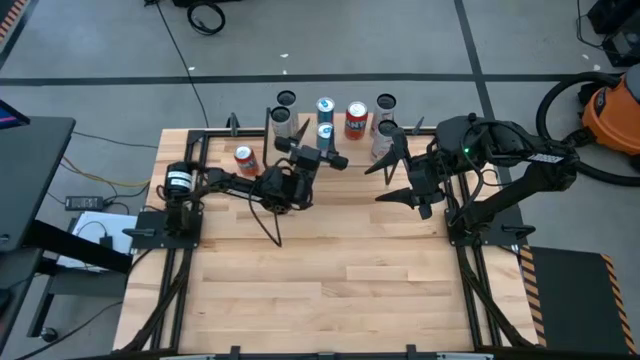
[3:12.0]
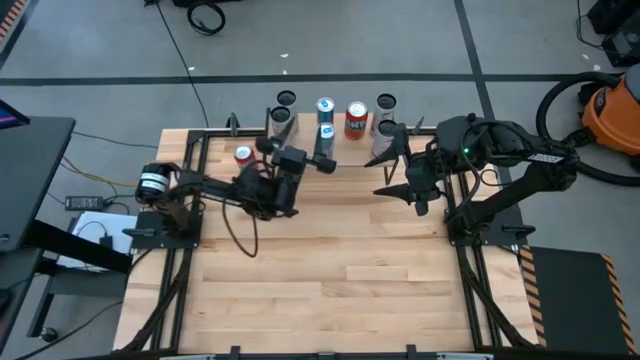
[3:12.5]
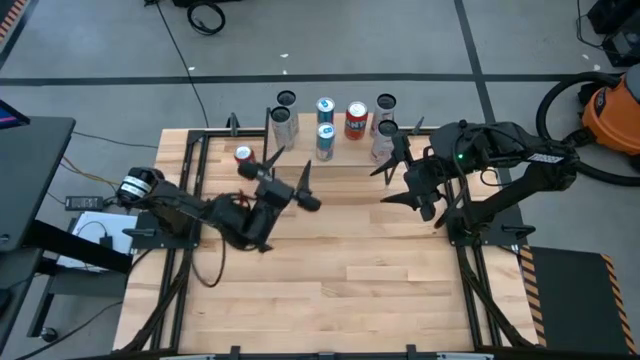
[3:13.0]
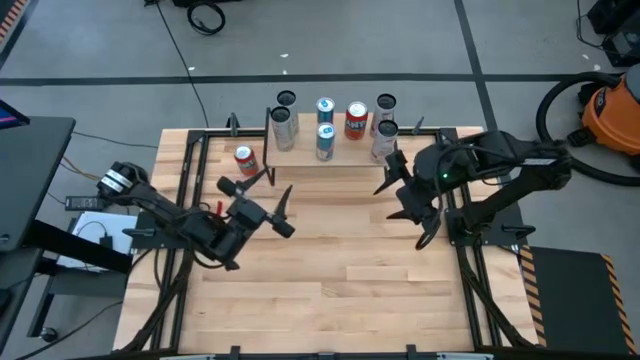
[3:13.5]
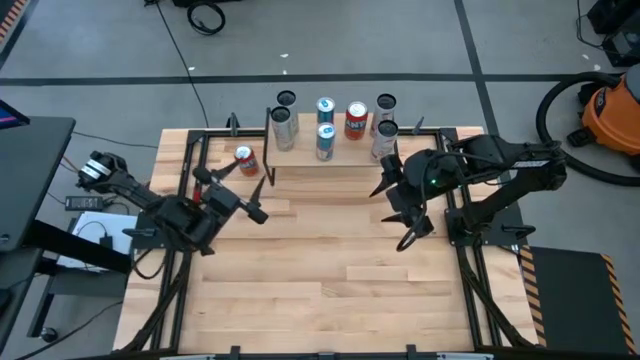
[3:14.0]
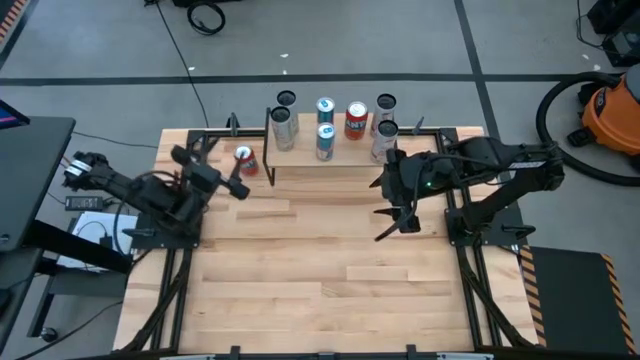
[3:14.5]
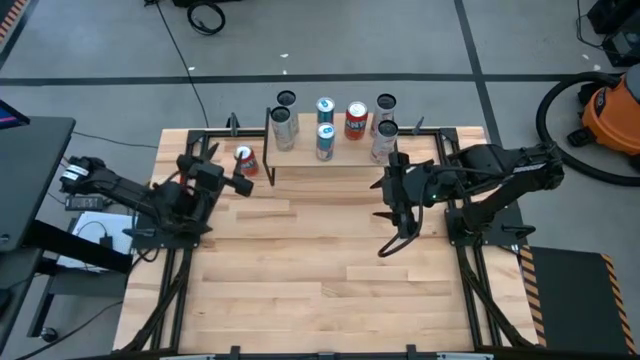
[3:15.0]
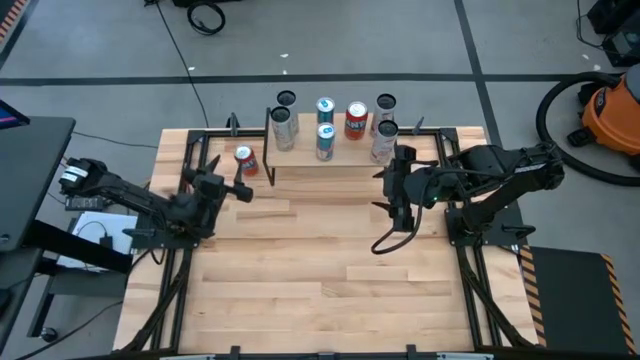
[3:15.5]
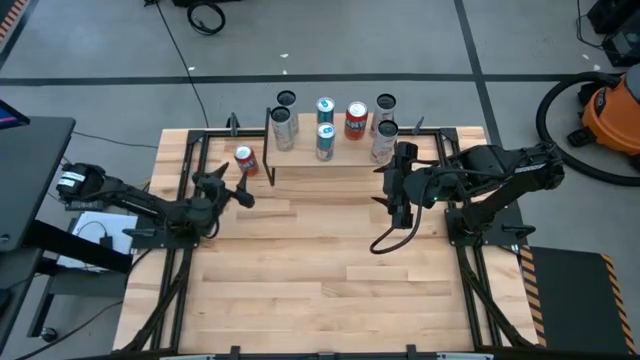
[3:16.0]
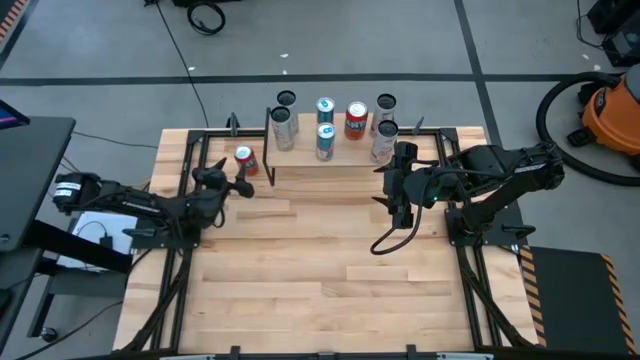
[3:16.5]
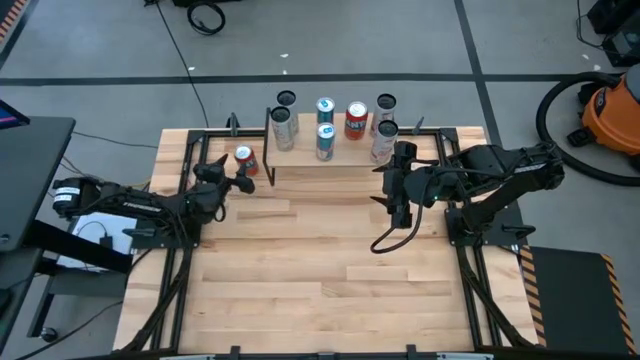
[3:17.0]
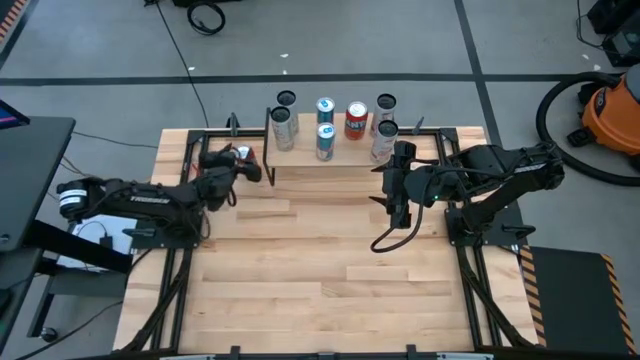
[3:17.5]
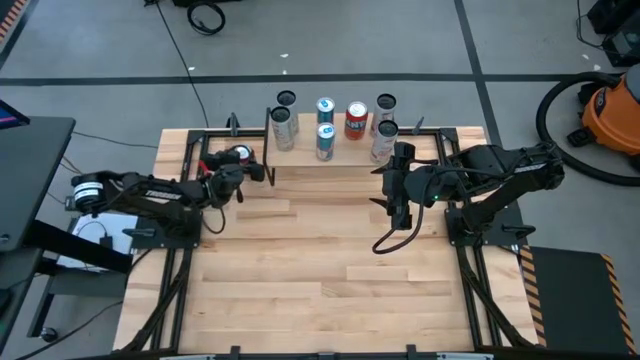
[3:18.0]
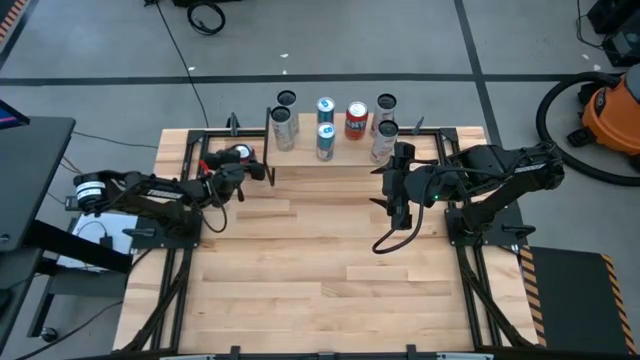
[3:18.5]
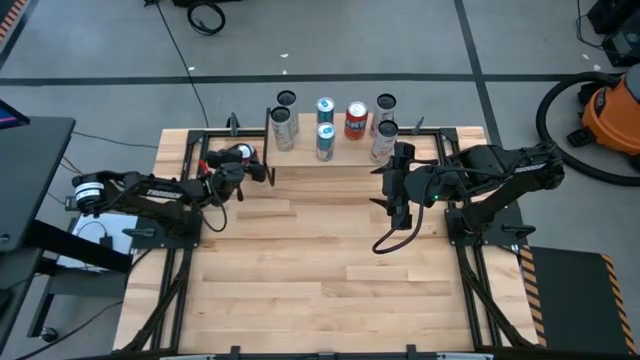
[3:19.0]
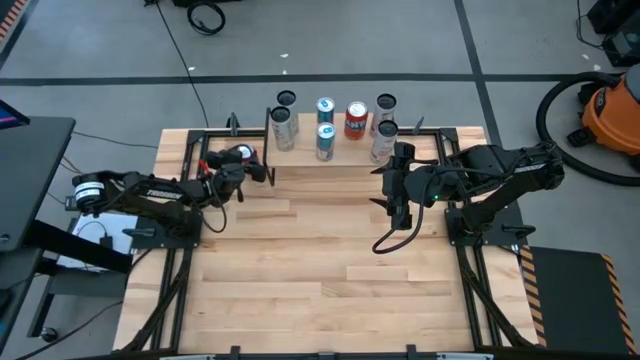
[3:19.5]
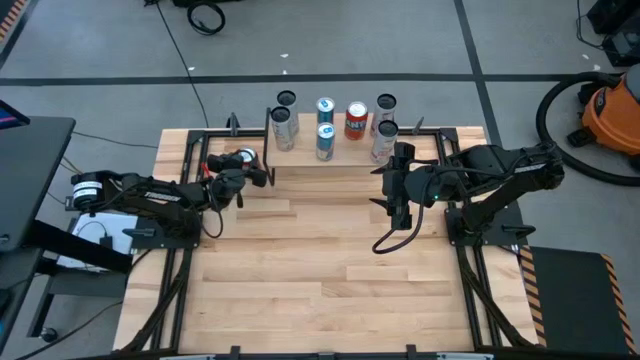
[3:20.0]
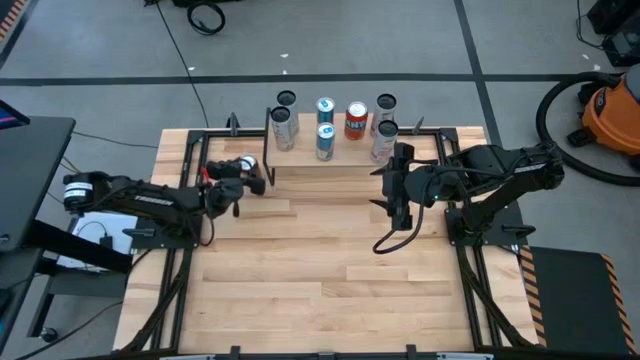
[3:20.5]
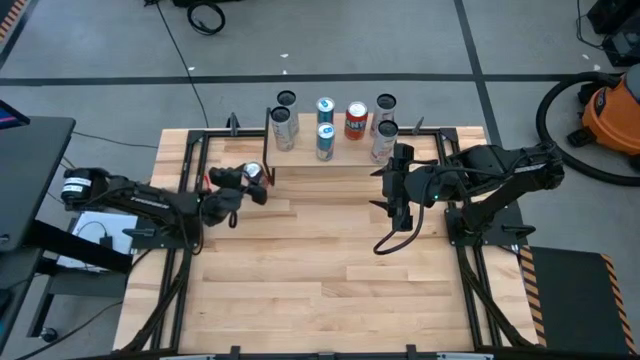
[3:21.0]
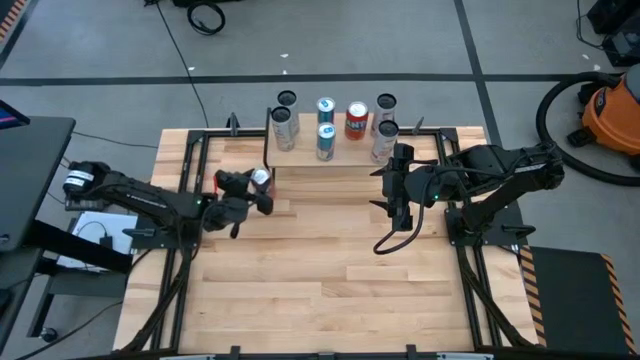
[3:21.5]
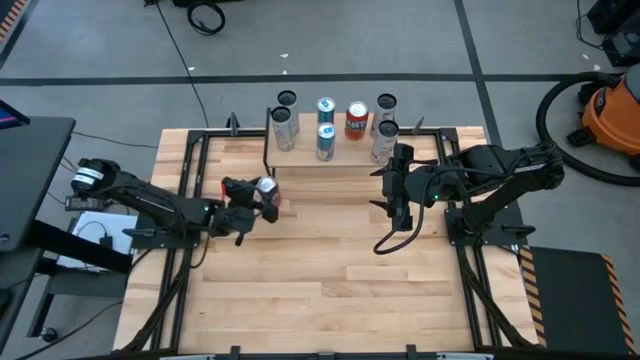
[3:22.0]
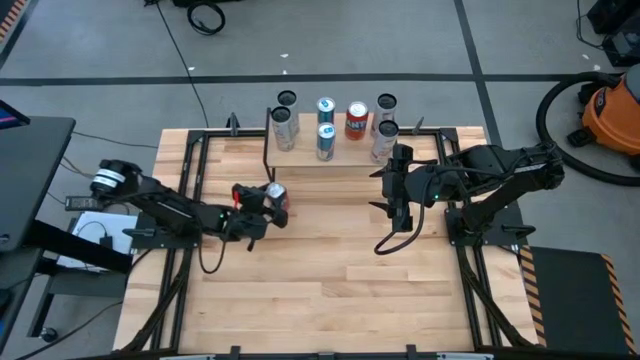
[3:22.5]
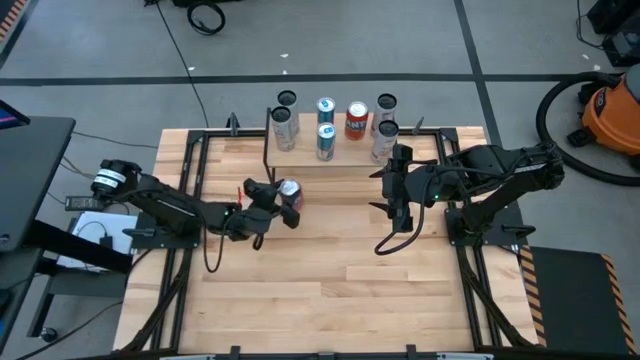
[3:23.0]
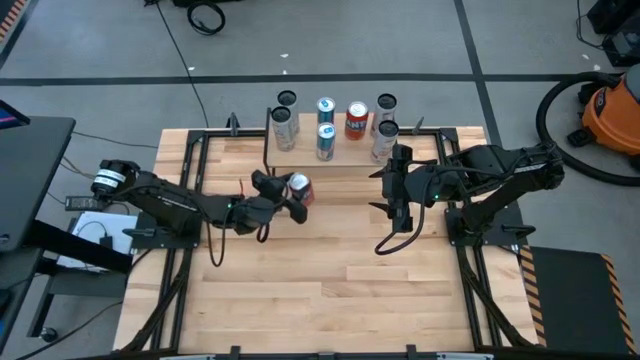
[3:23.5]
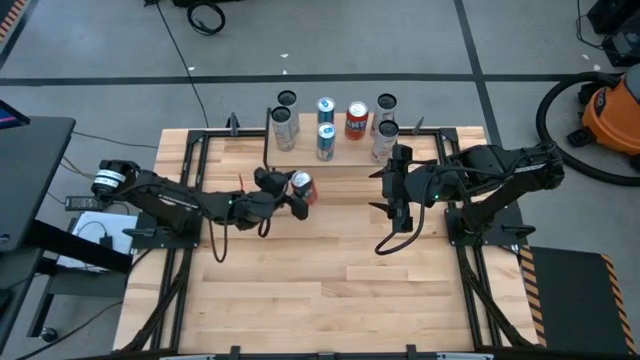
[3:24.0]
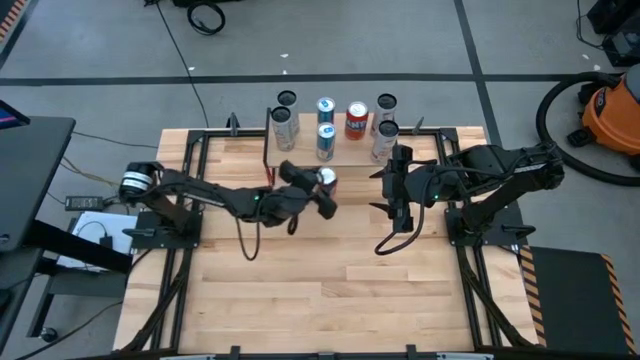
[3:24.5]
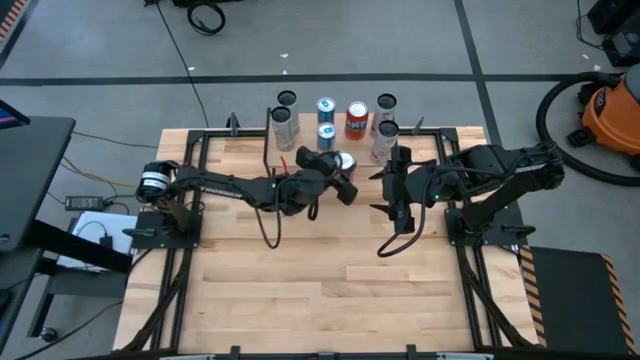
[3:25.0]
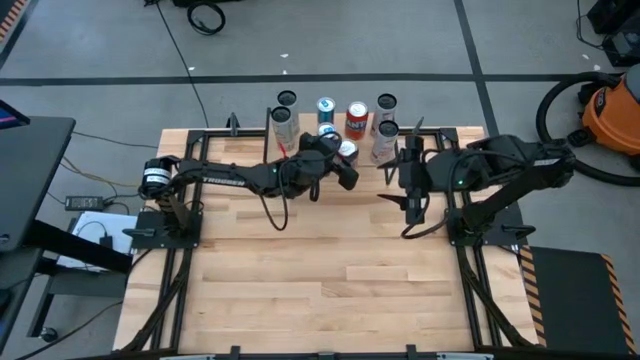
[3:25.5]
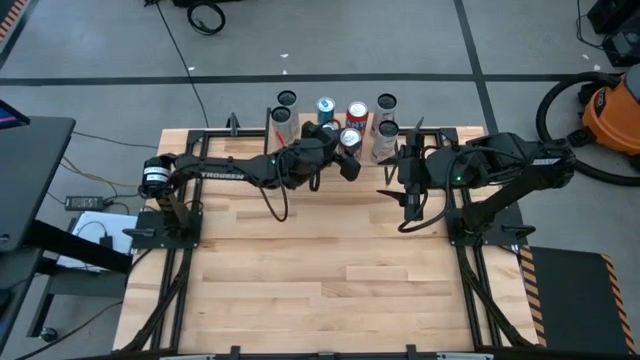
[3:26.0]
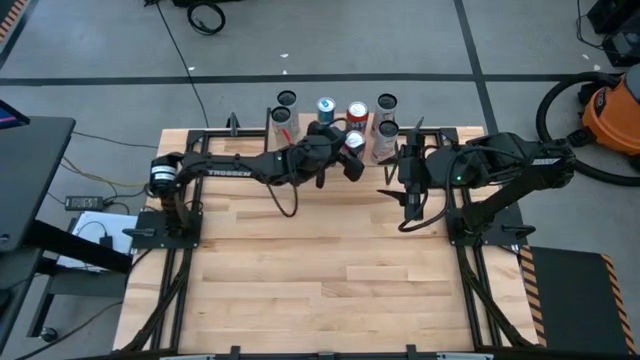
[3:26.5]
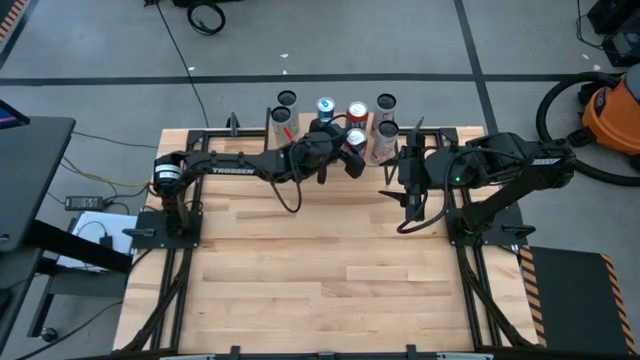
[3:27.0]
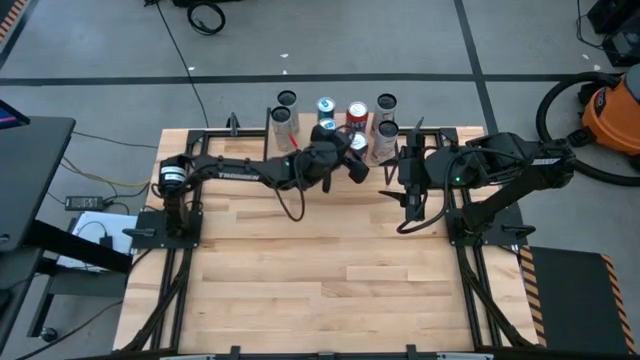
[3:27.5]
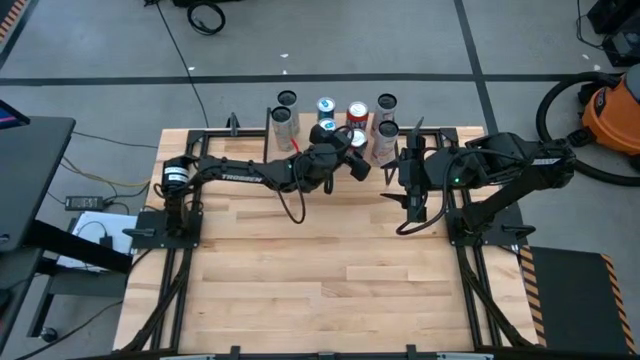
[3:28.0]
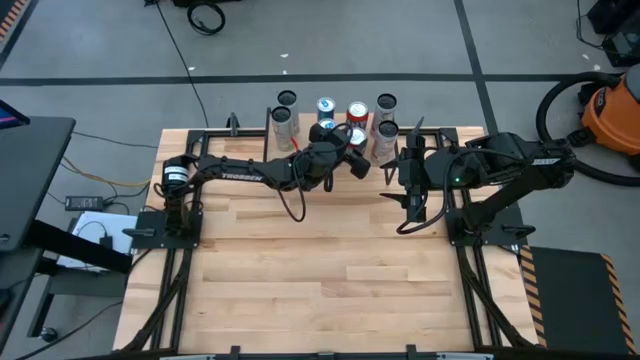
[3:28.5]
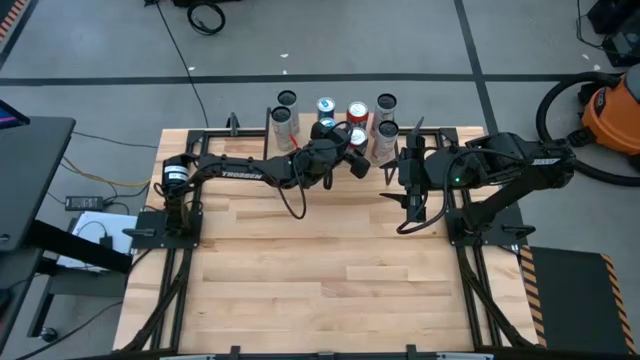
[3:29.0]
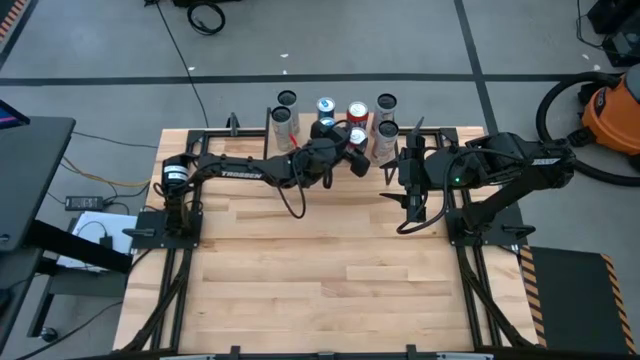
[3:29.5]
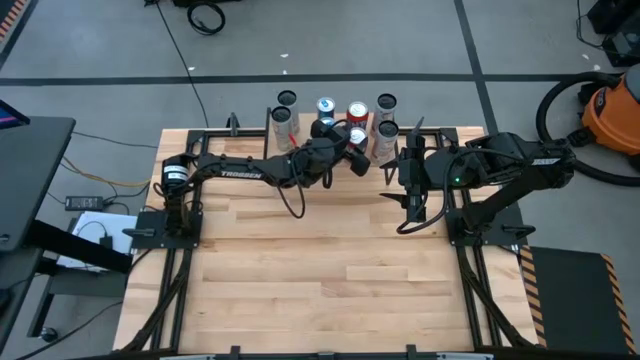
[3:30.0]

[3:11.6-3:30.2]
Task: Place canned beverage on shelf
Put the red soda can on the shelf aligned with the other red soda can

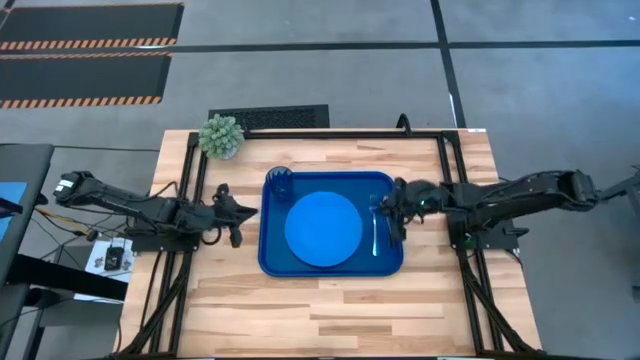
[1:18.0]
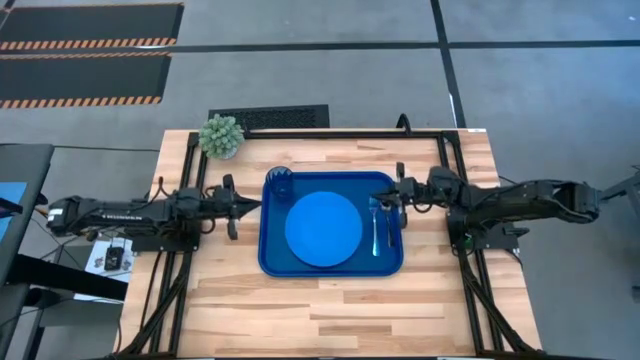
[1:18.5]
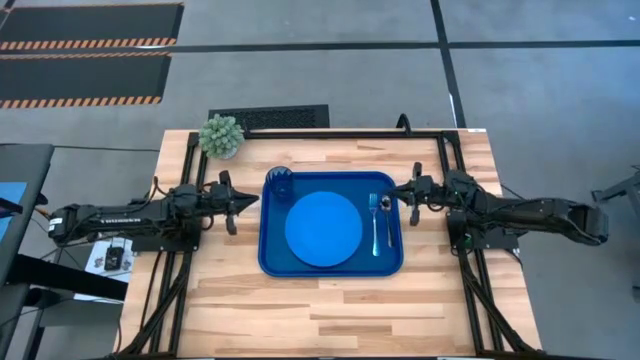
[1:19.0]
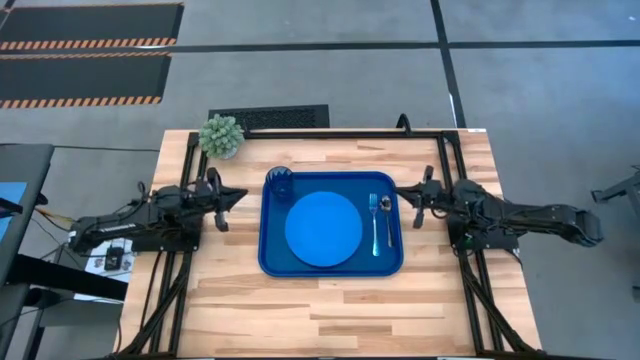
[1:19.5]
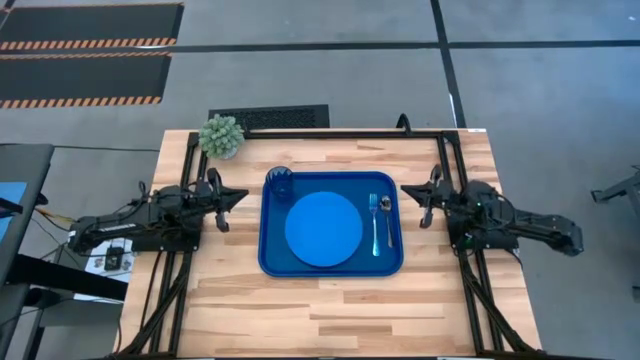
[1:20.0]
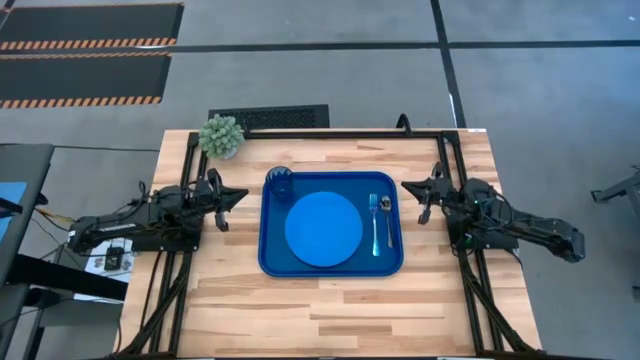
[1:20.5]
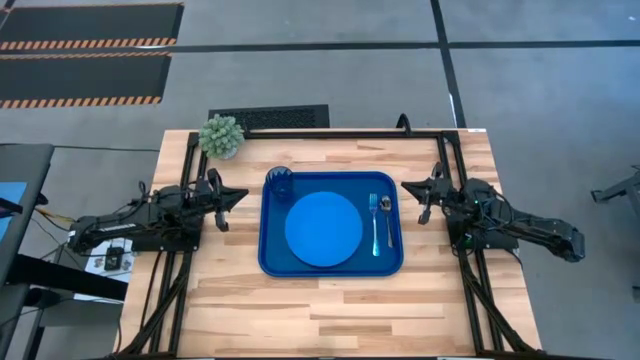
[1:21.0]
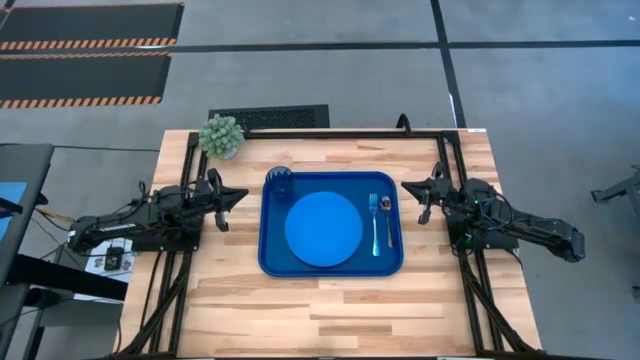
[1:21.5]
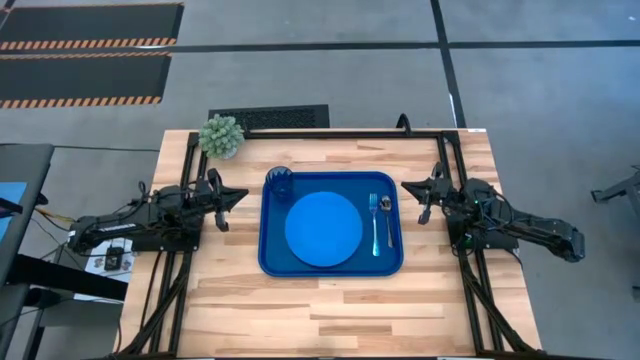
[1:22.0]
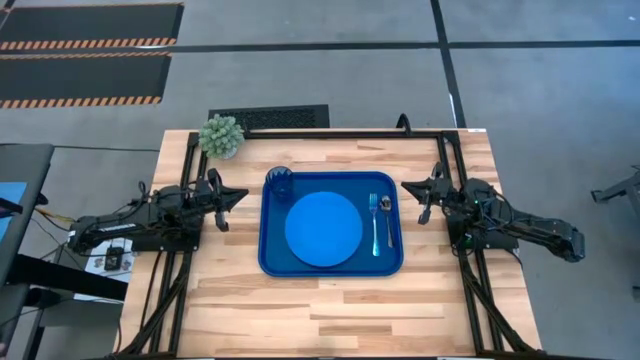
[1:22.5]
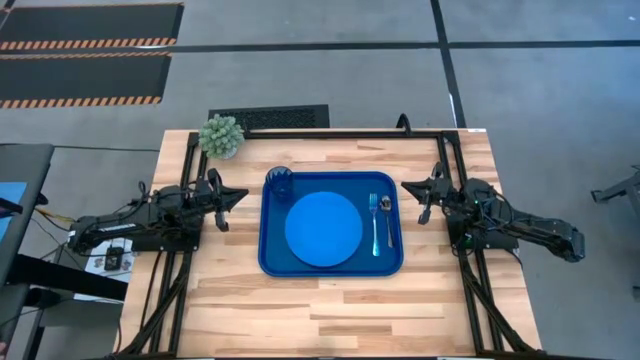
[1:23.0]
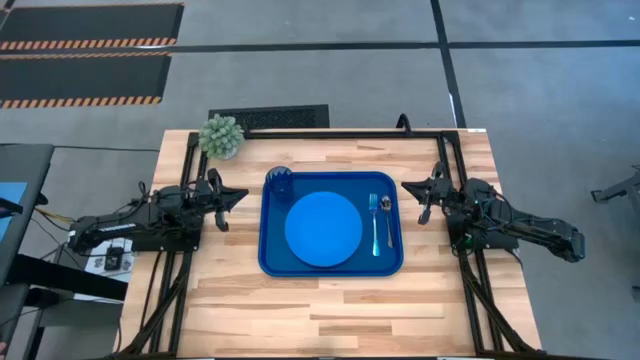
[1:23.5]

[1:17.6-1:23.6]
Task: Pick and place plate/cup/fork/spoon on tray
Return to Home Position
